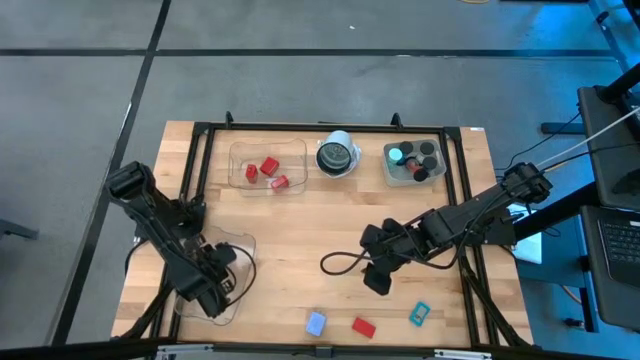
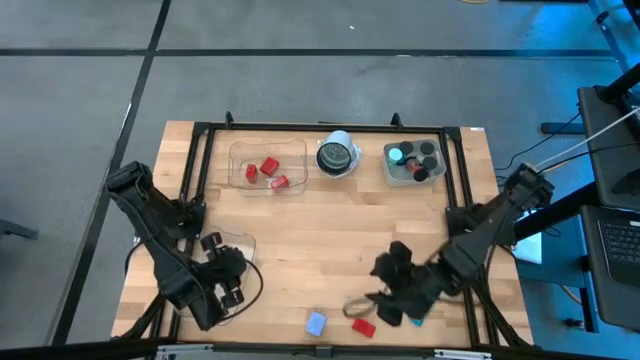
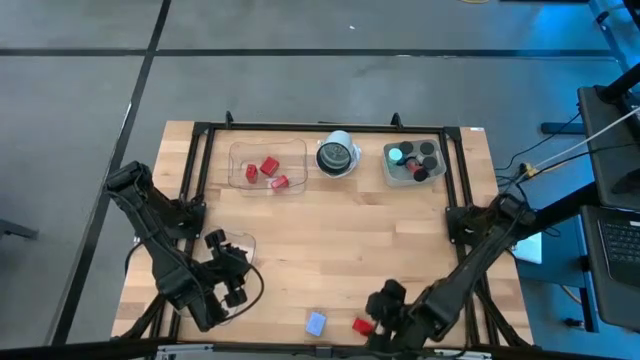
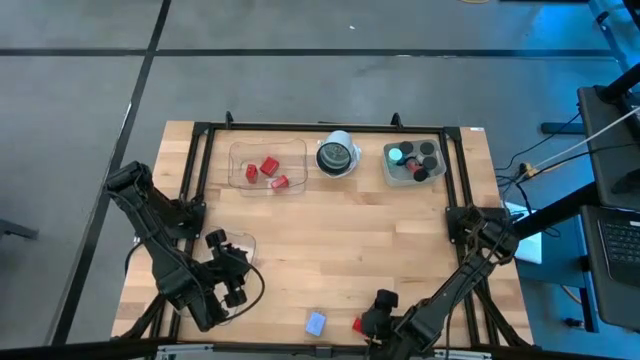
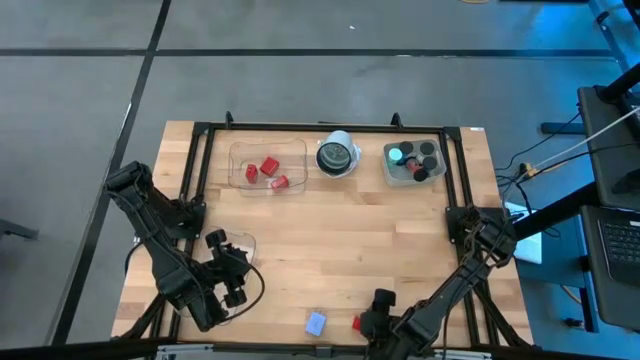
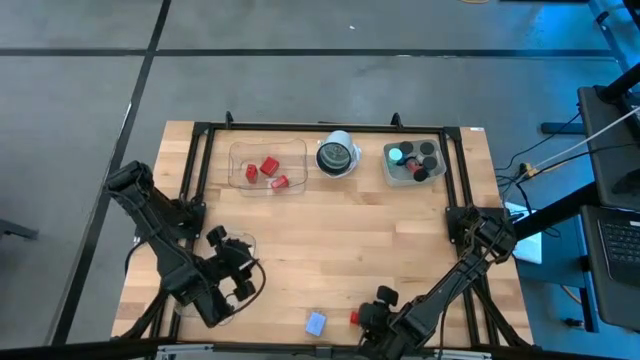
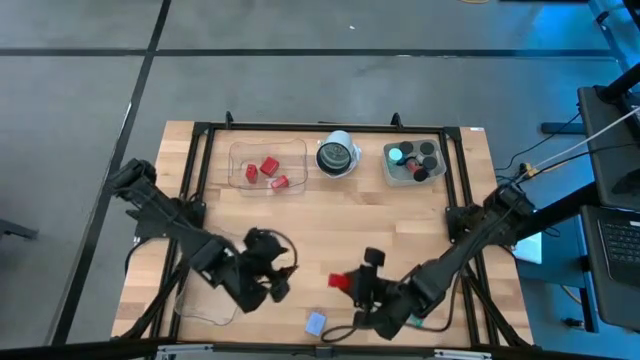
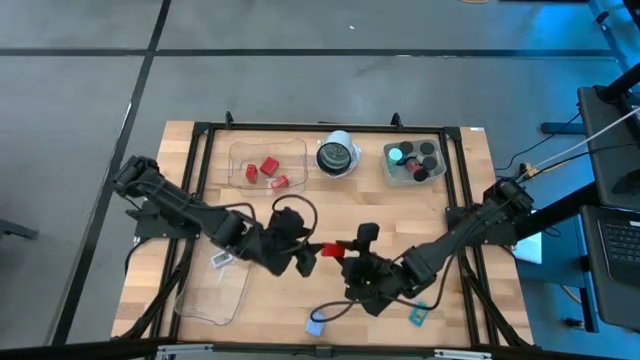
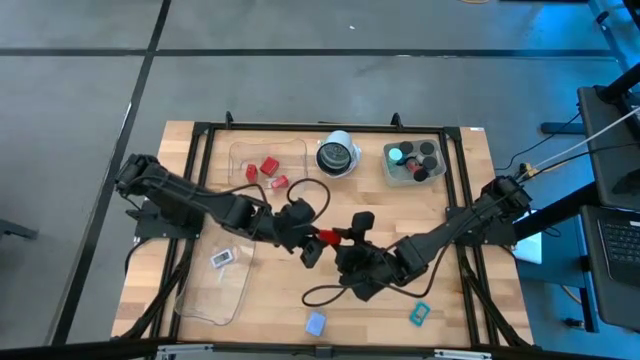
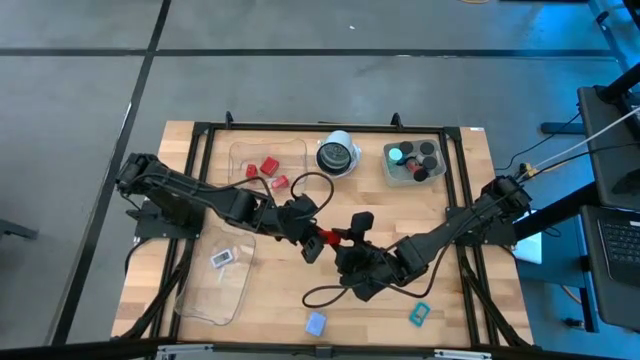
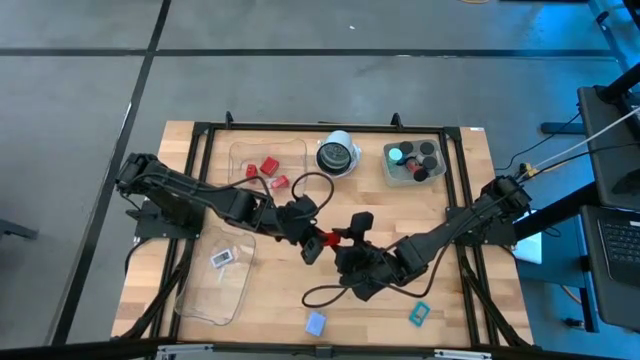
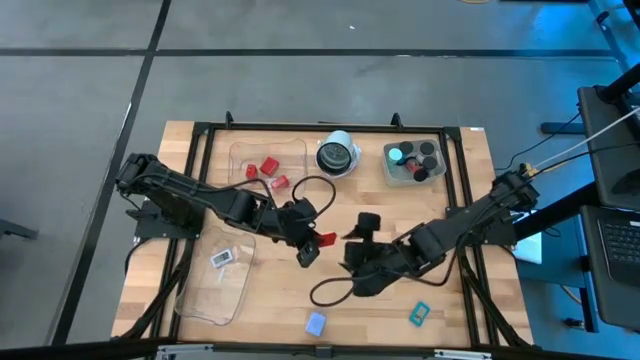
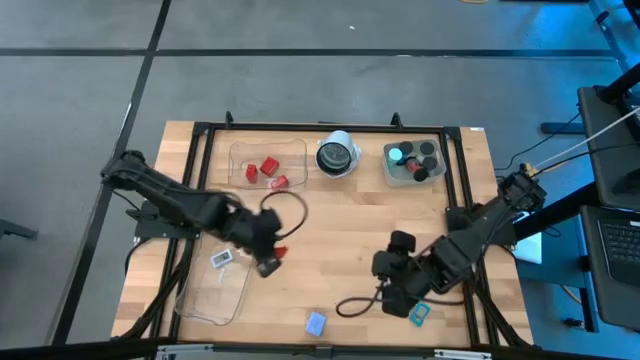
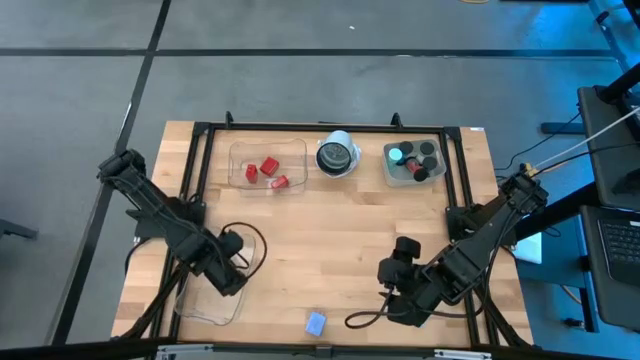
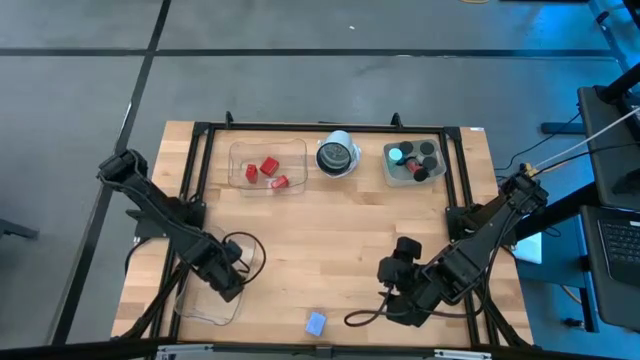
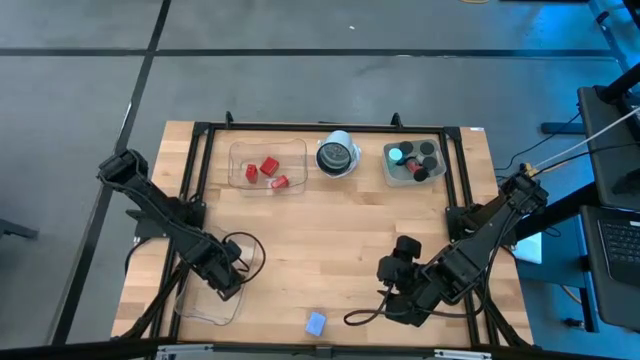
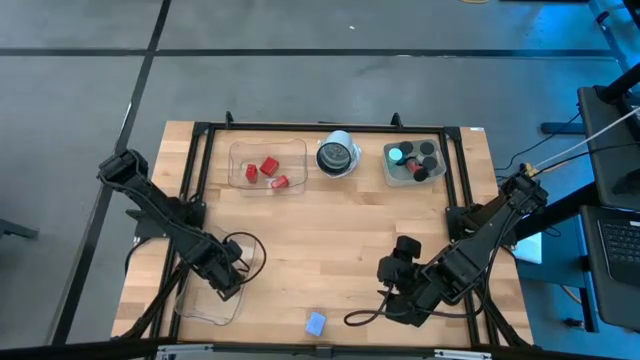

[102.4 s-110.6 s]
Task: Pick & Place Office items
Put the red digital clock into the bottom transparent bin

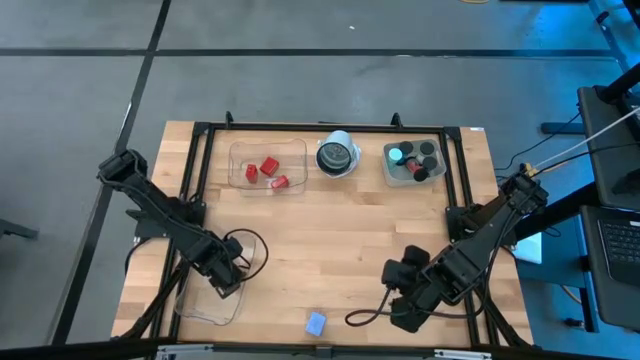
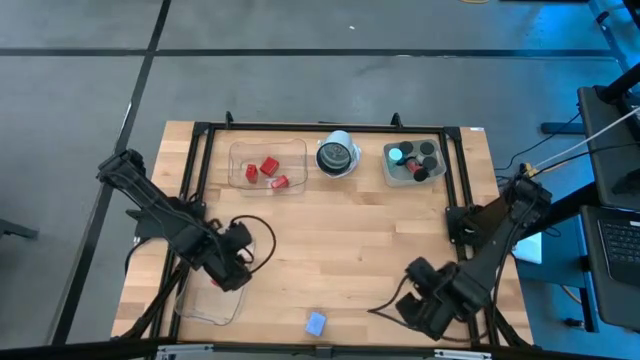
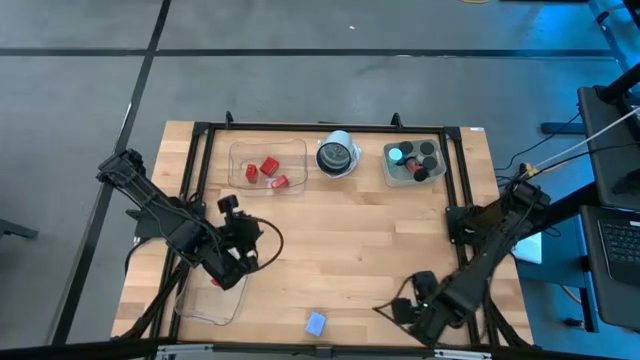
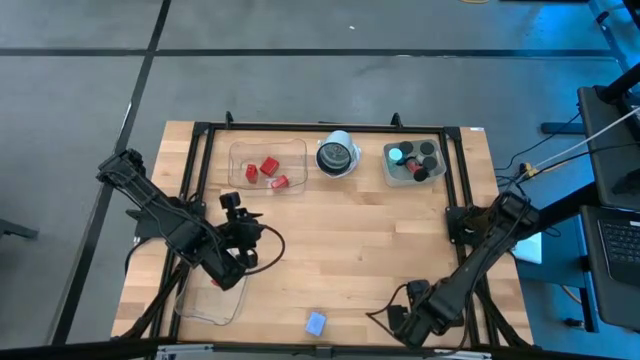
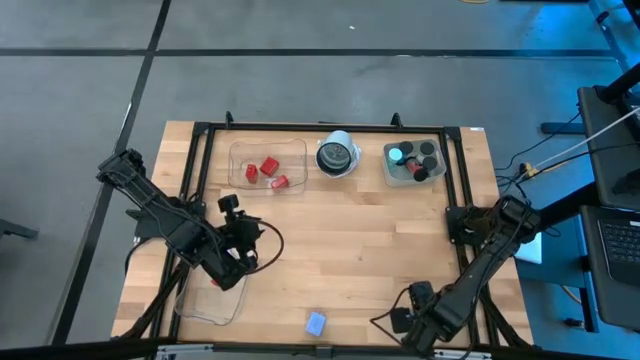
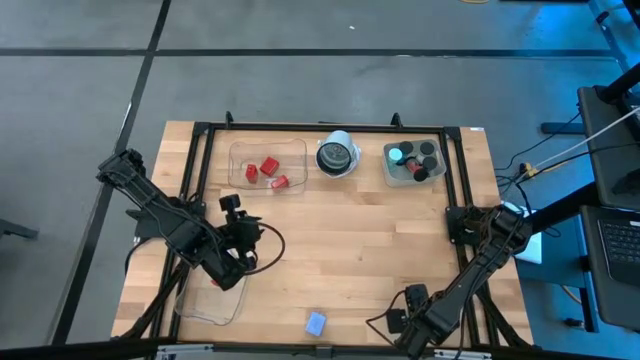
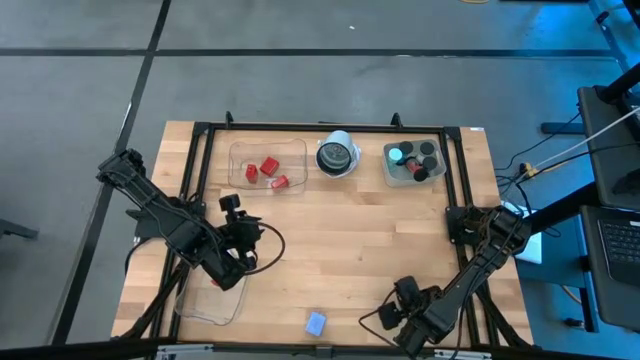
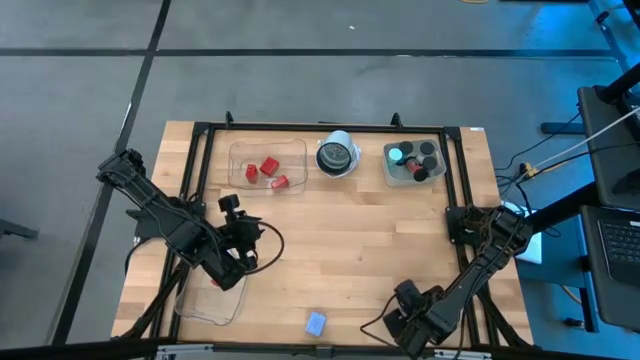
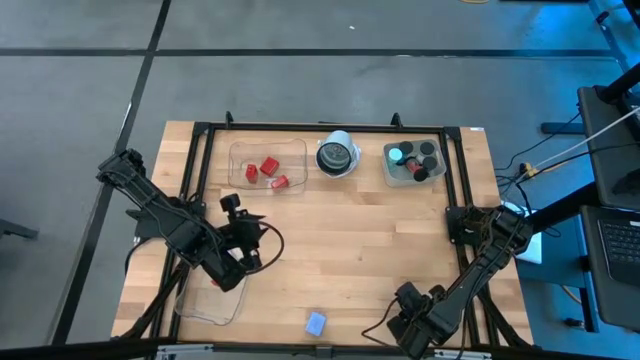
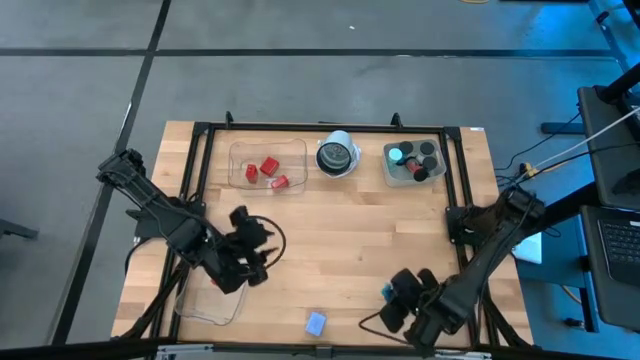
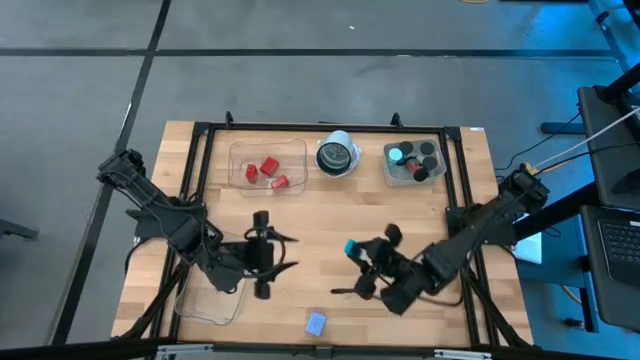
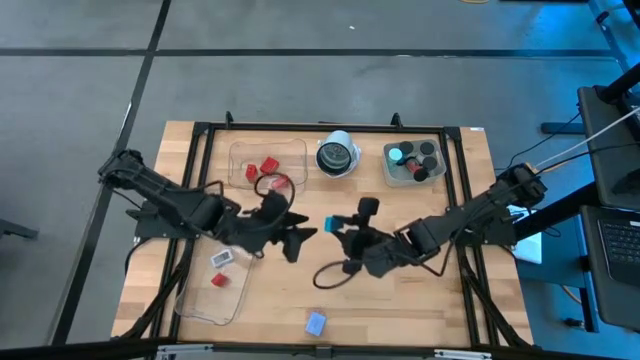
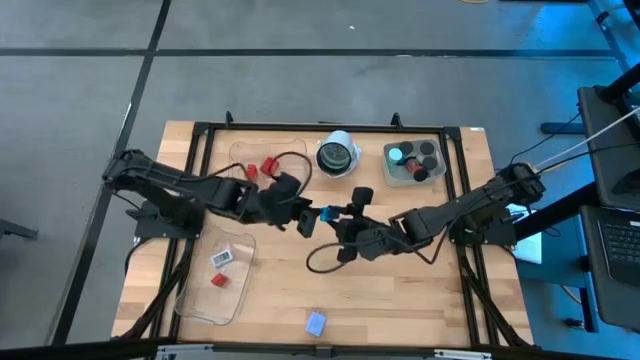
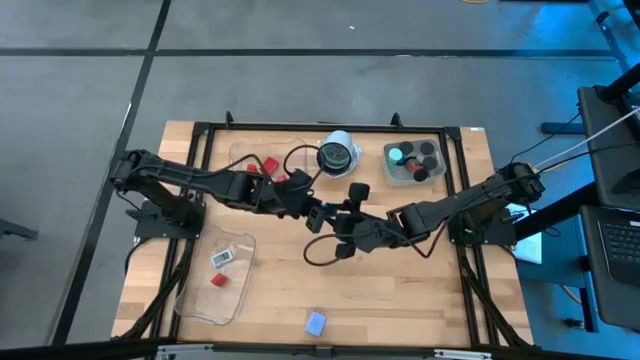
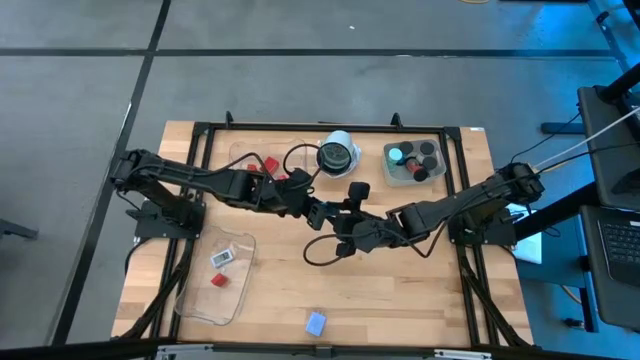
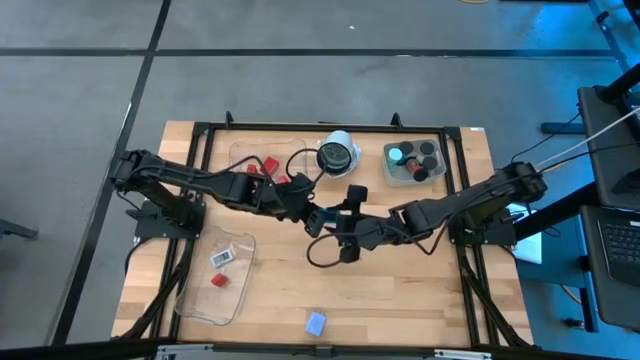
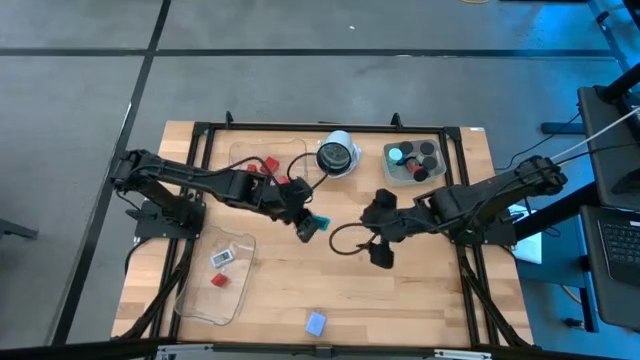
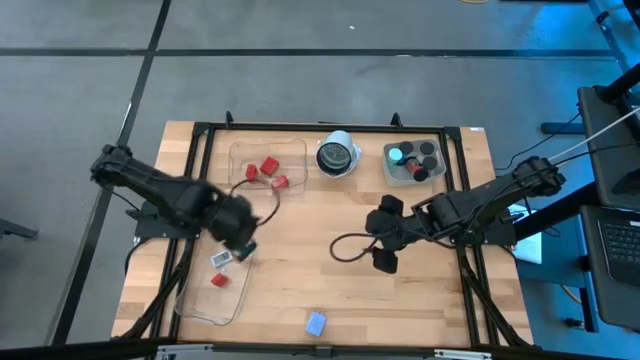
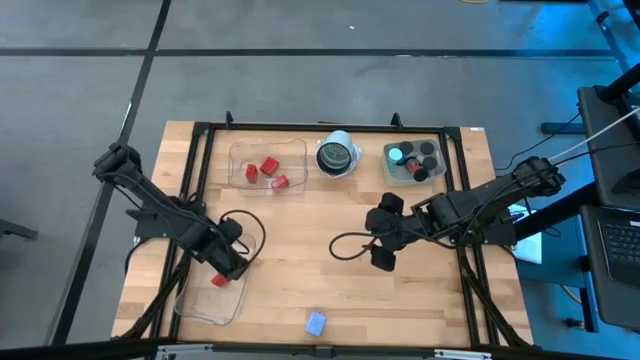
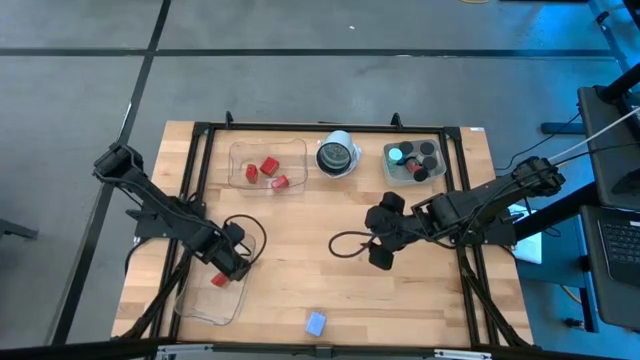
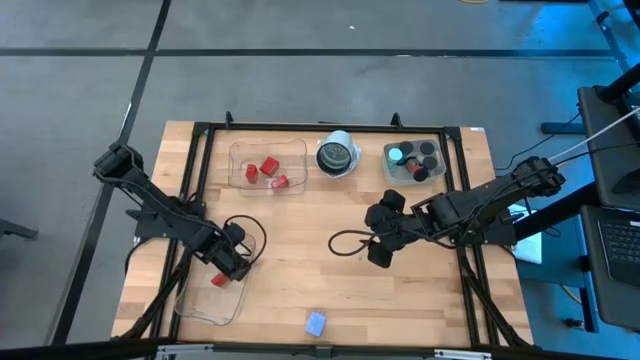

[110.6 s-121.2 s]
Put the blue digital clock into the bottom transparent bin

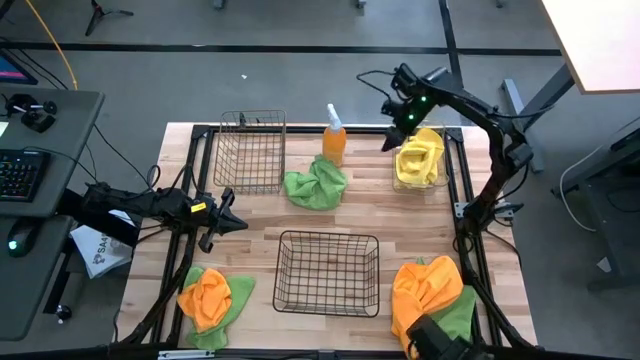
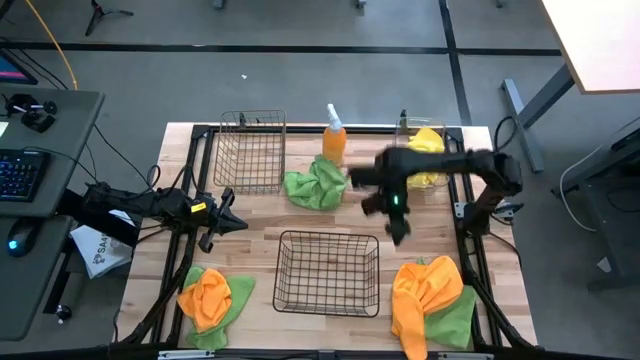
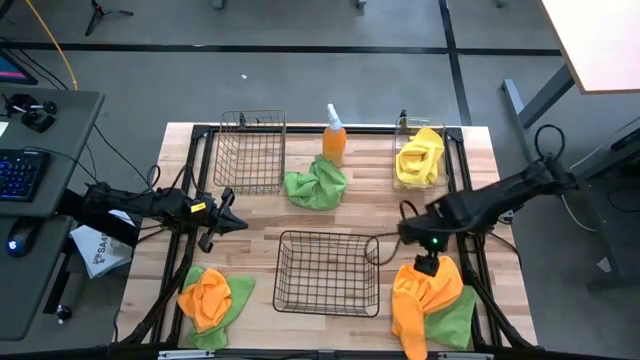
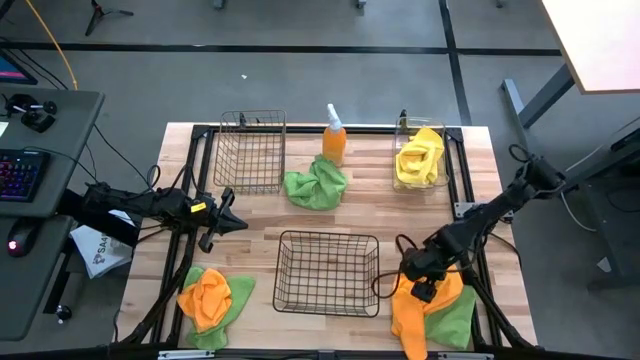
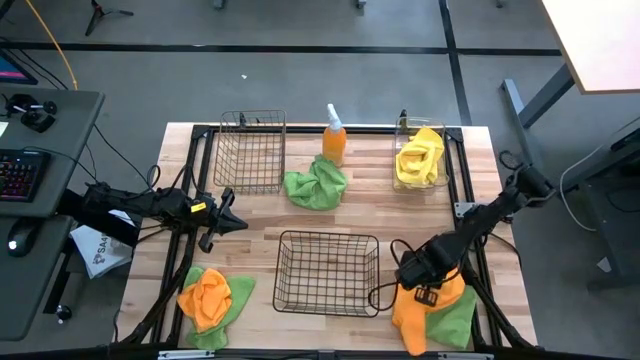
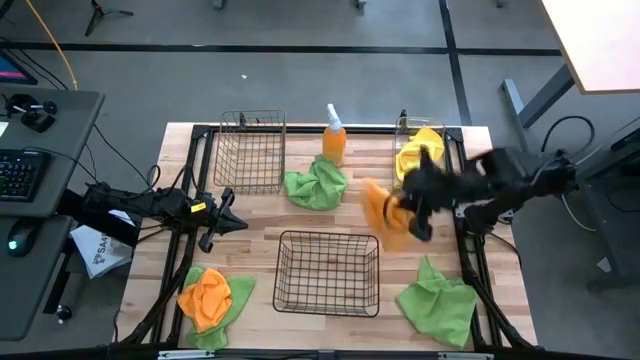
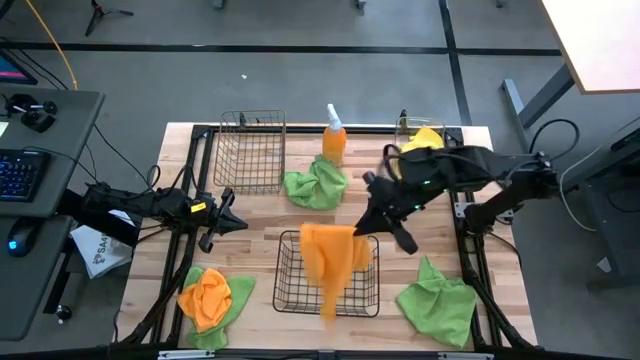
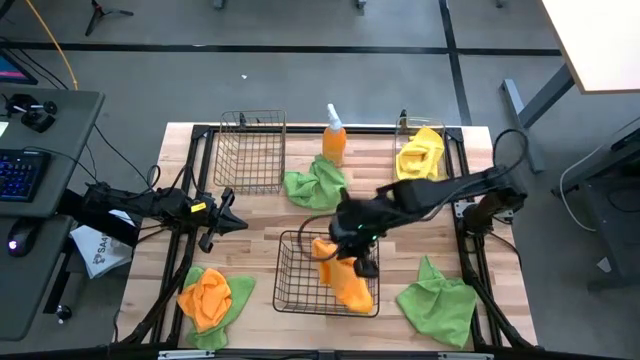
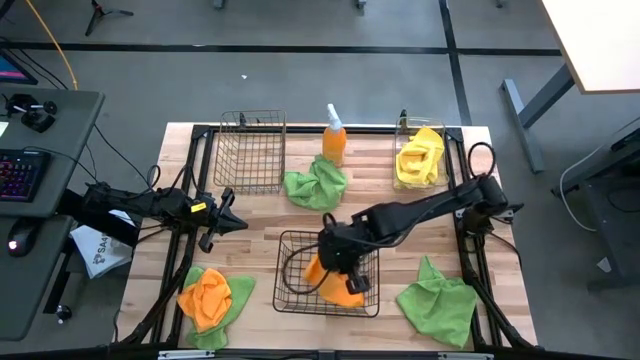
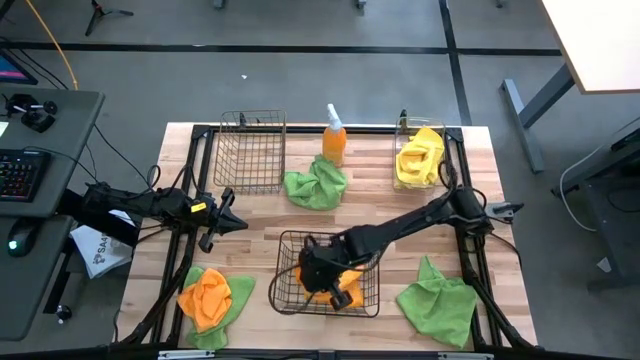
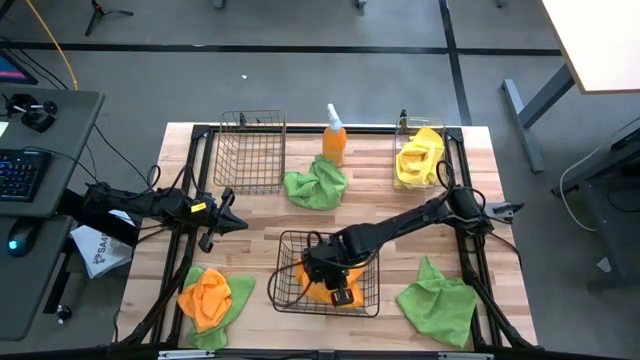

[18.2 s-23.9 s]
Task: Sort microfiber towel by color & place in baskets
Put the right orange microfiber towel into the black wire basket
